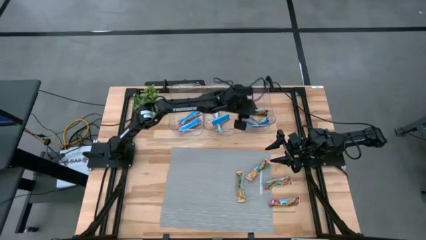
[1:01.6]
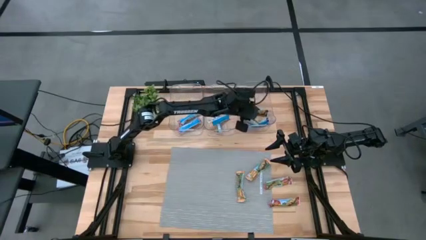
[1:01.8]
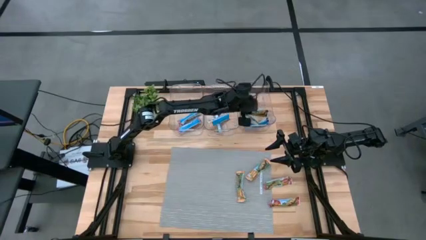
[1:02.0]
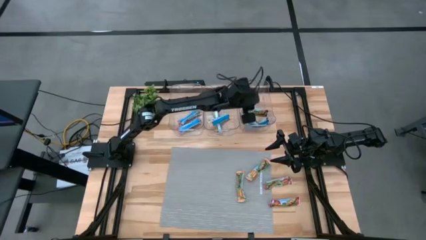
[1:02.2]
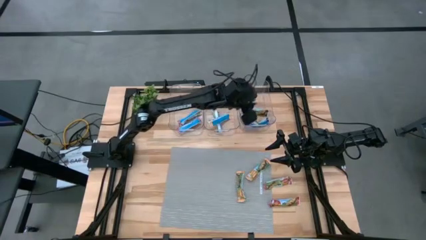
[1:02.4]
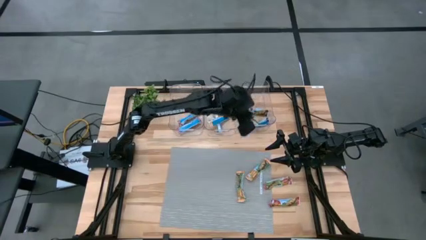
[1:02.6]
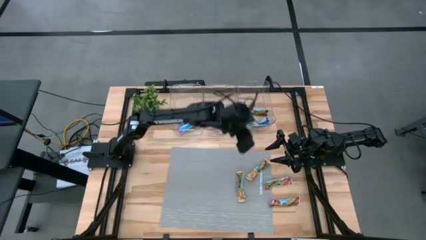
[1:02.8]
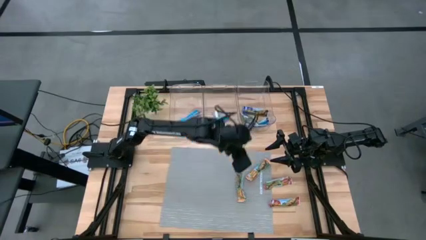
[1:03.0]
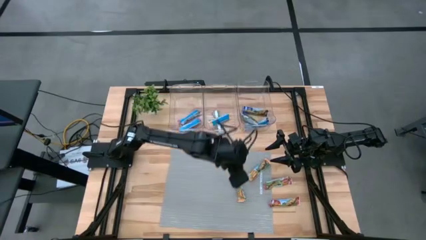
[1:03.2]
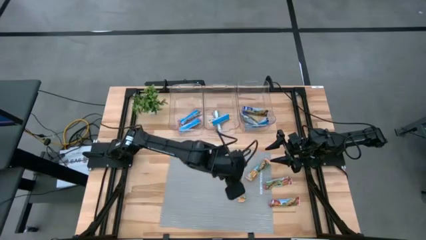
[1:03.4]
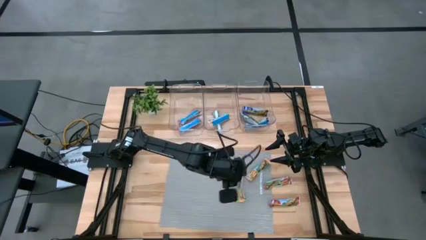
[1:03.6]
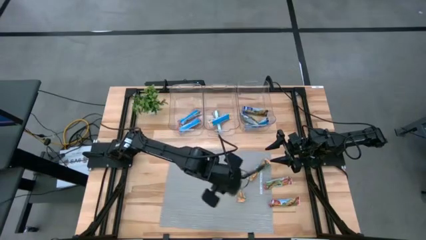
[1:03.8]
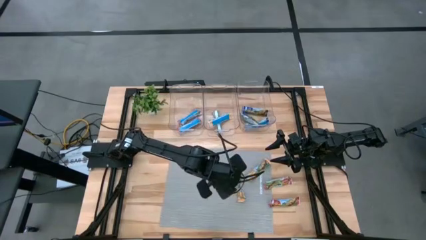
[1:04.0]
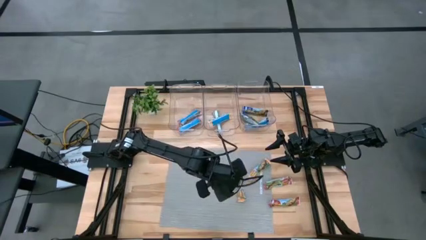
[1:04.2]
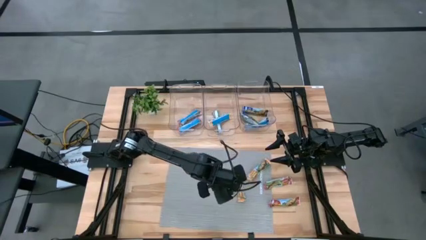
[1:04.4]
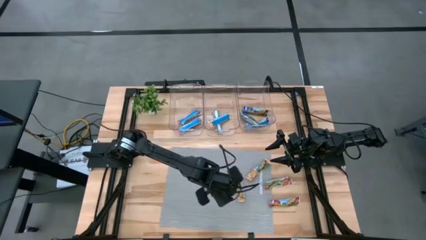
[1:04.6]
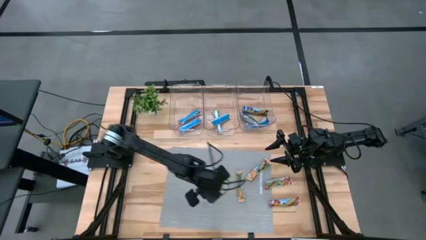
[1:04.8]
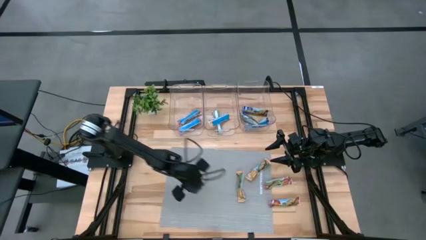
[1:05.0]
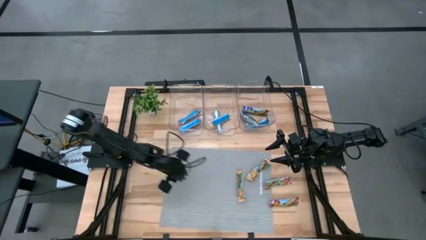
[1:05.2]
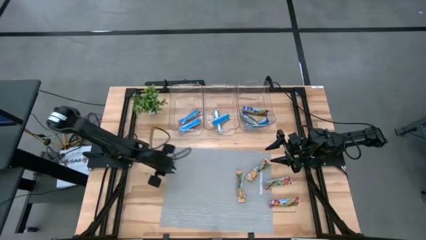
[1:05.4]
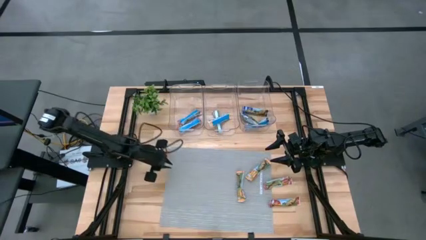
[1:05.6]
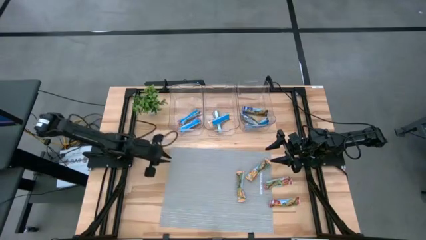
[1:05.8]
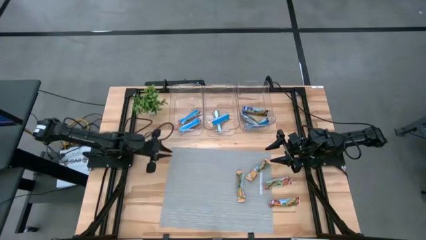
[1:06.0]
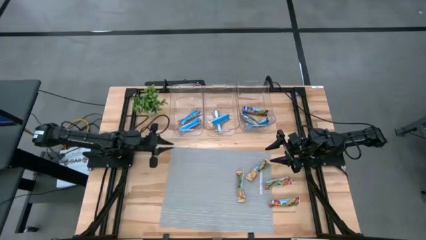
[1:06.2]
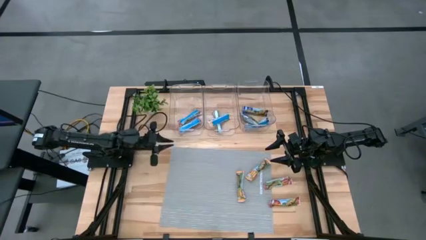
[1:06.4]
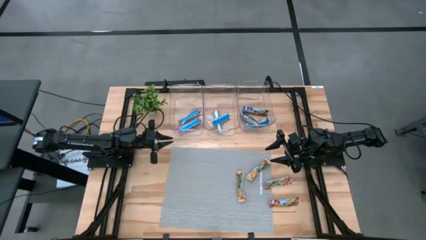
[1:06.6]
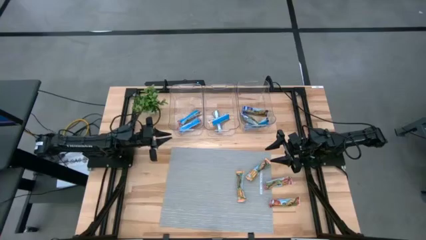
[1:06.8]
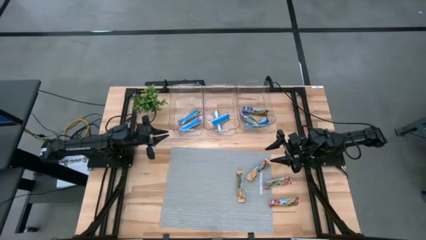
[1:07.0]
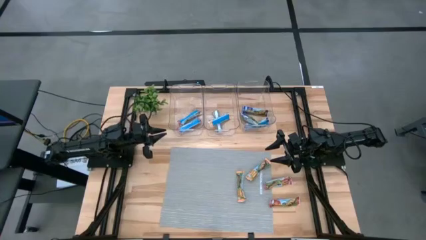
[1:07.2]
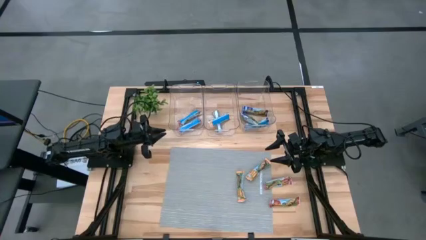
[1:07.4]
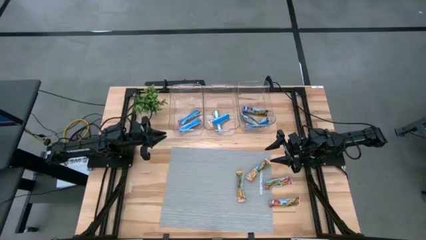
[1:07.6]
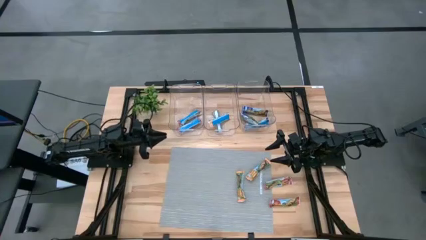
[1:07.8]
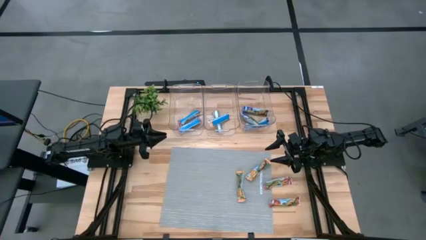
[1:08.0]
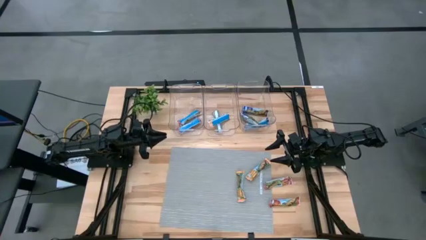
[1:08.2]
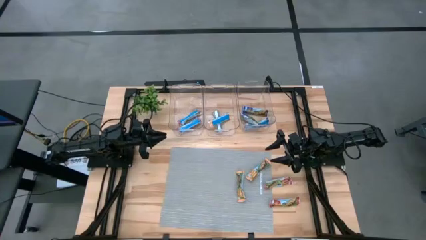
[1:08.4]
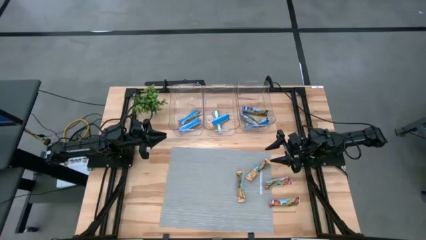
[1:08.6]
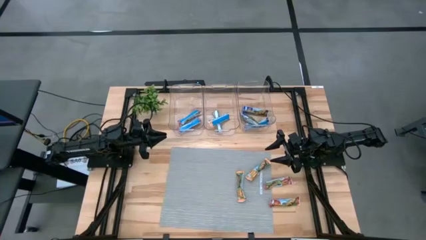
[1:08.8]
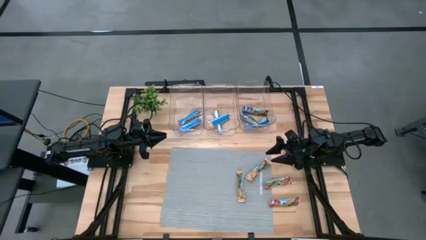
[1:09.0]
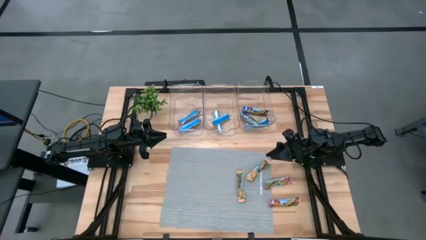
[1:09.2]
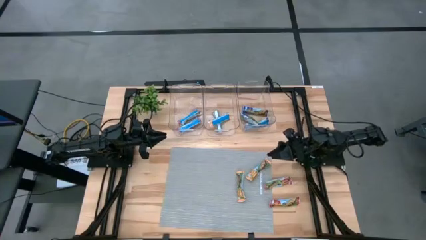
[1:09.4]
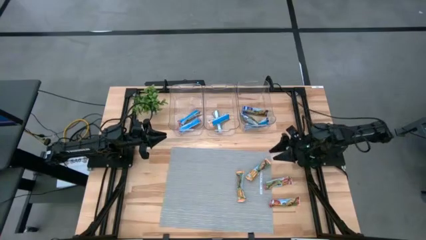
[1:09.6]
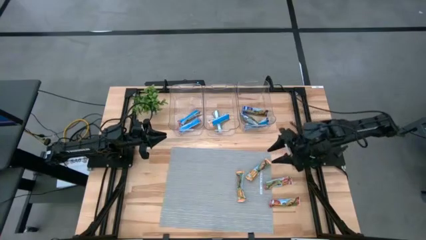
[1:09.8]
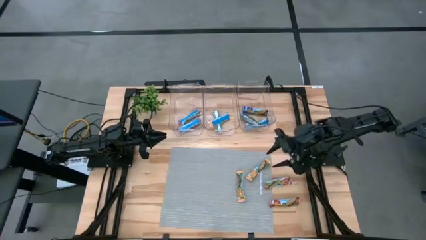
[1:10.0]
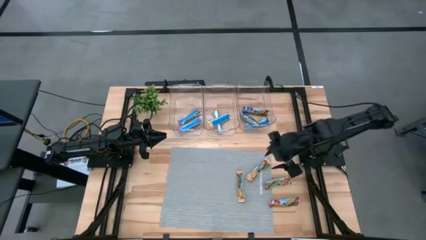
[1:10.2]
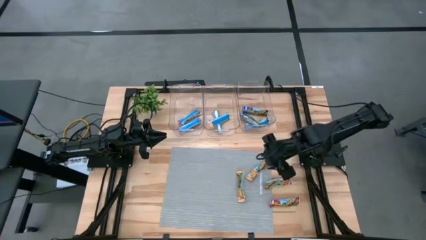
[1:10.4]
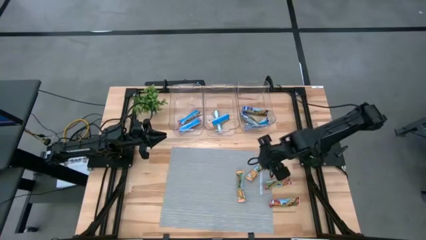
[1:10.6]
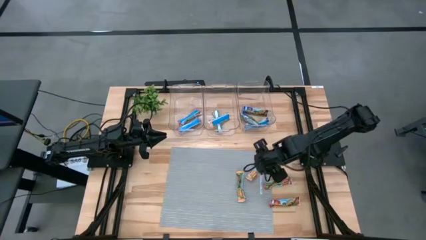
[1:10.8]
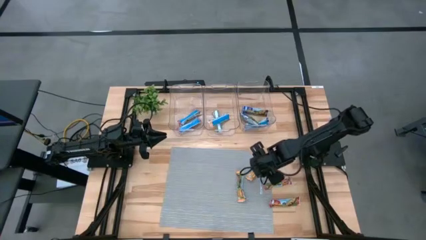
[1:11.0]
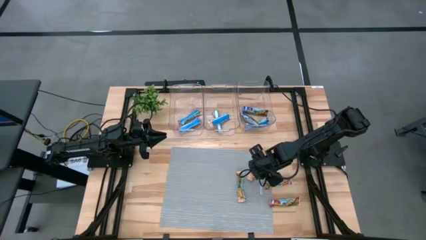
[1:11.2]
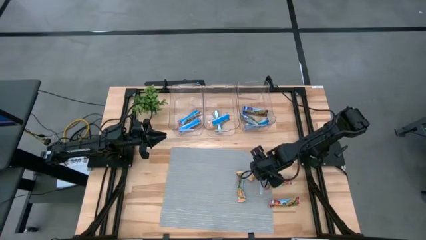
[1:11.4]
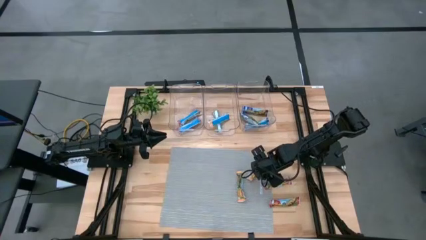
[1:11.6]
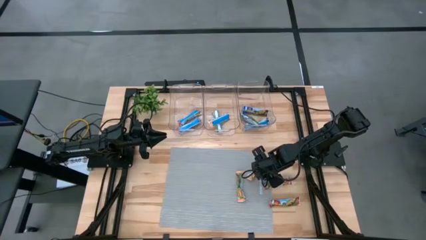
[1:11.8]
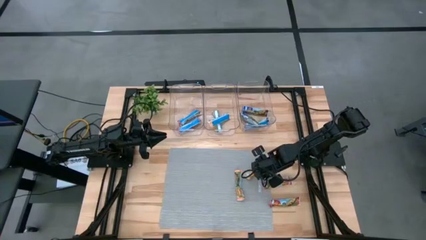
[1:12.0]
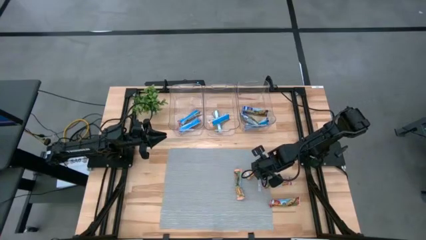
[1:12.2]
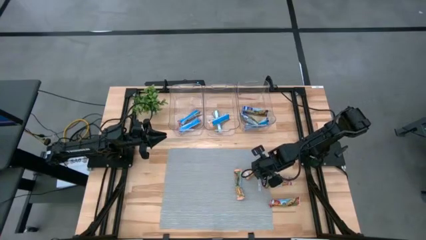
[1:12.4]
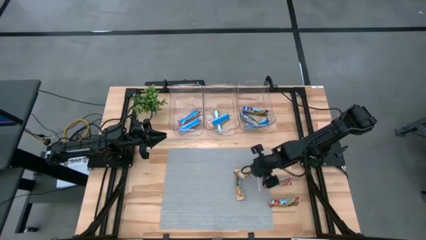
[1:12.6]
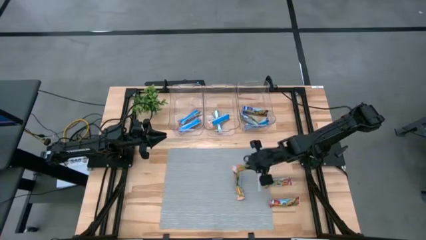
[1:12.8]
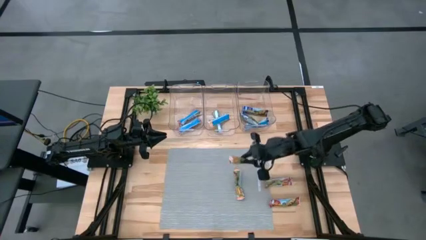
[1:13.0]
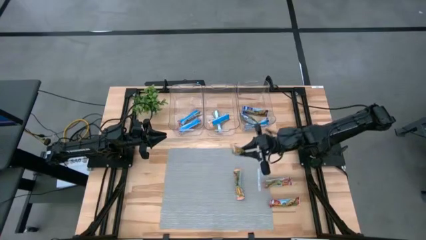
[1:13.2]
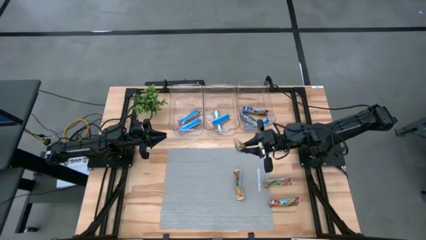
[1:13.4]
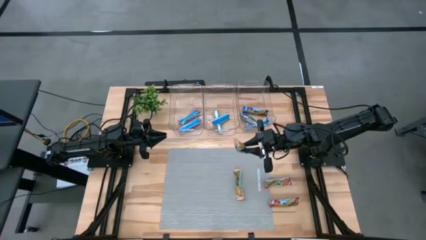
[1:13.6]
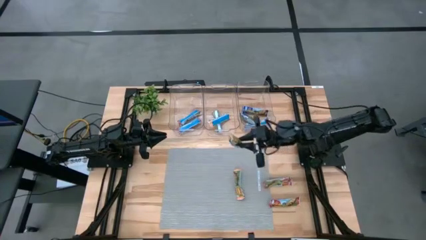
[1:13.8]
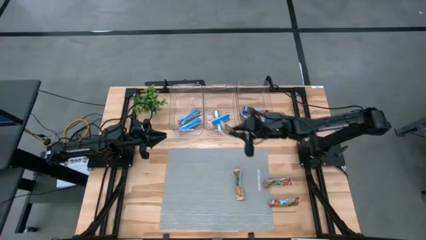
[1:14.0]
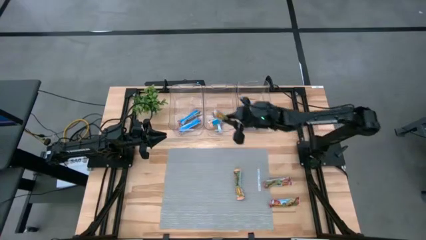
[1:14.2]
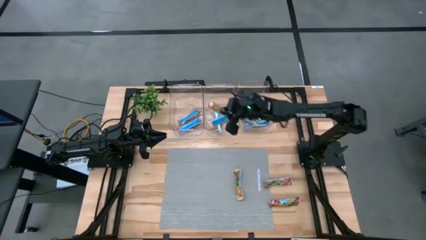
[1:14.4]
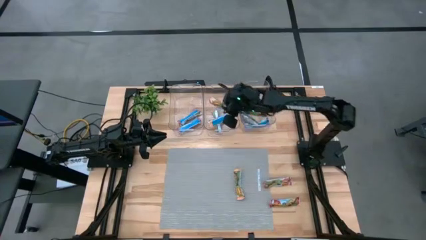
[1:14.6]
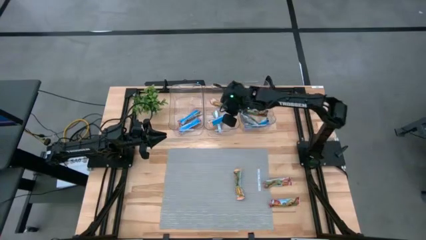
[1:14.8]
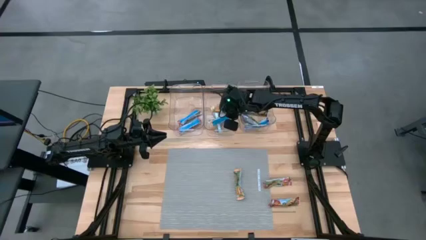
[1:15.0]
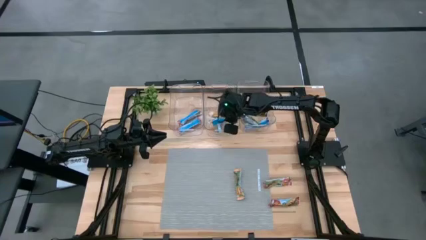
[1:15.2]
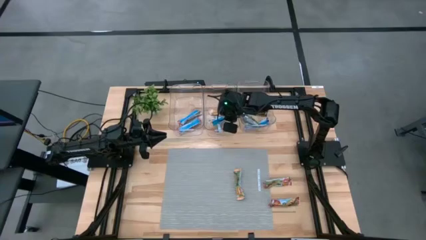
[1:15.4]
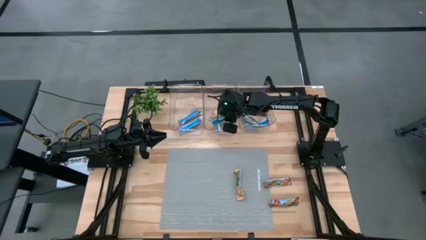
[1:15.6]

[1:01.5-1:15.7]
Task: Pick and place Granola Bars by type
Put the orange granola bar into the middle transparent bin

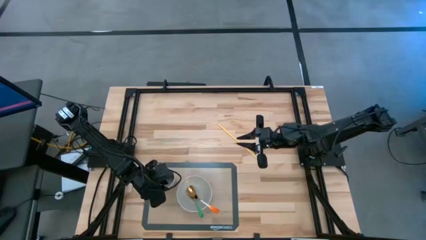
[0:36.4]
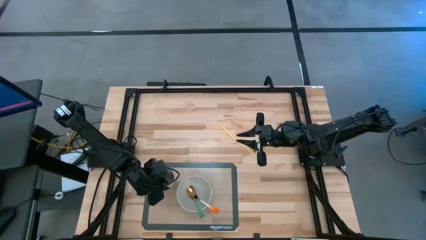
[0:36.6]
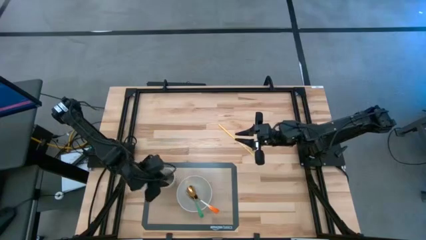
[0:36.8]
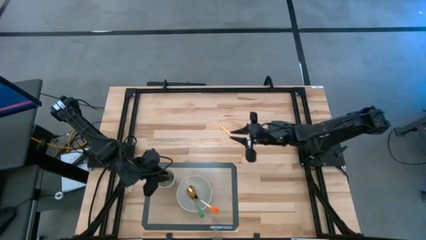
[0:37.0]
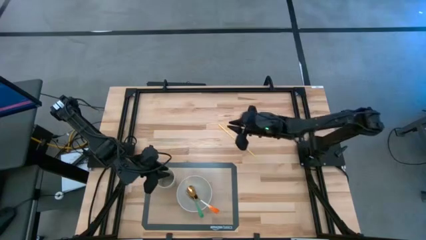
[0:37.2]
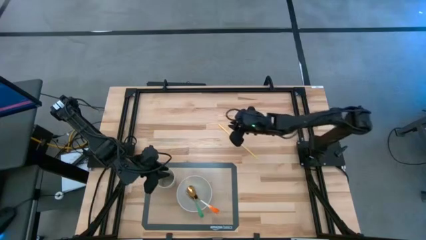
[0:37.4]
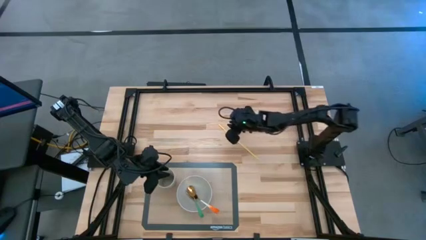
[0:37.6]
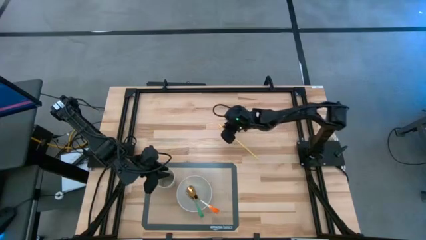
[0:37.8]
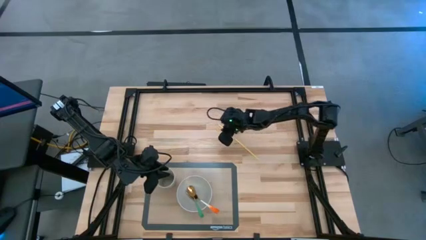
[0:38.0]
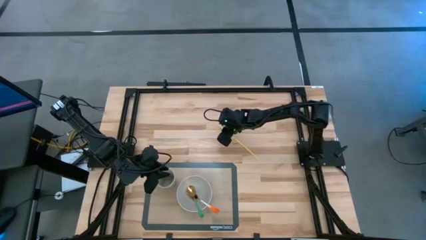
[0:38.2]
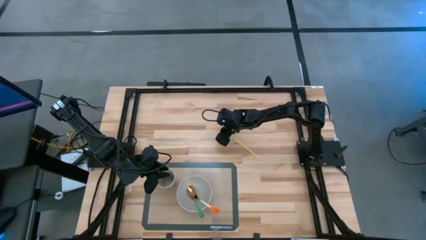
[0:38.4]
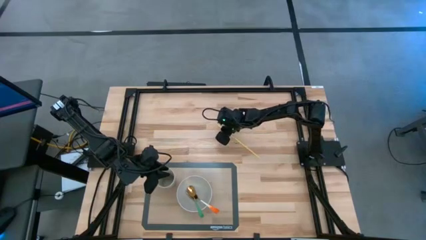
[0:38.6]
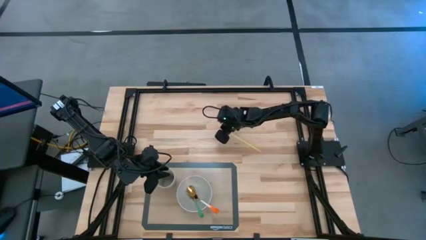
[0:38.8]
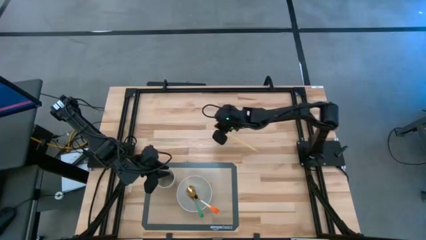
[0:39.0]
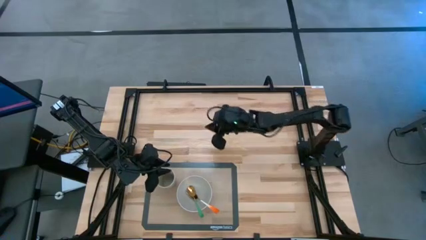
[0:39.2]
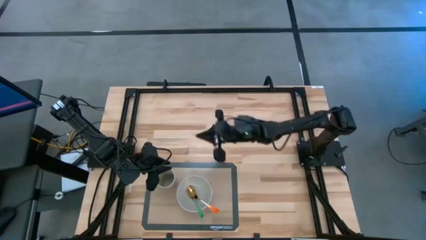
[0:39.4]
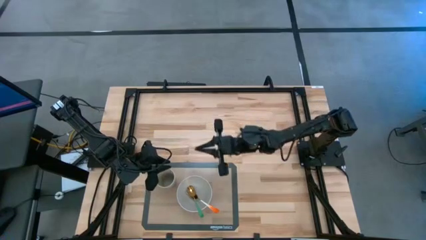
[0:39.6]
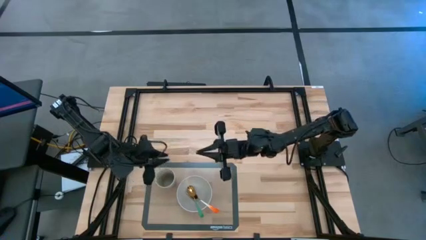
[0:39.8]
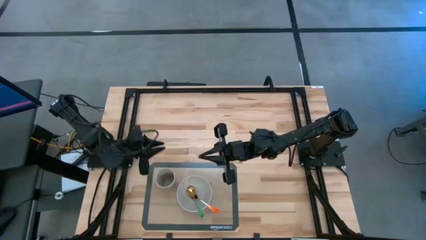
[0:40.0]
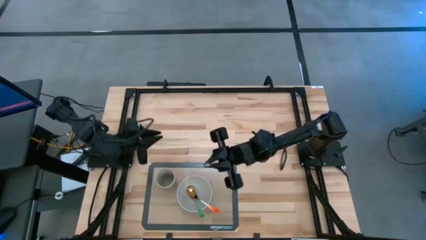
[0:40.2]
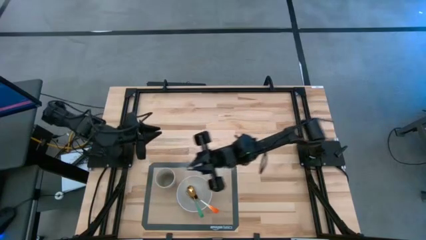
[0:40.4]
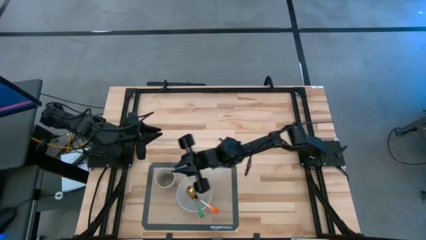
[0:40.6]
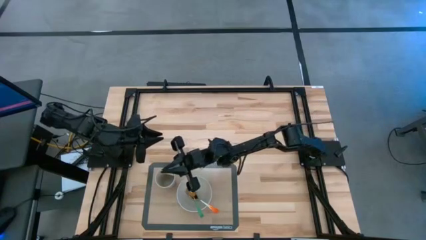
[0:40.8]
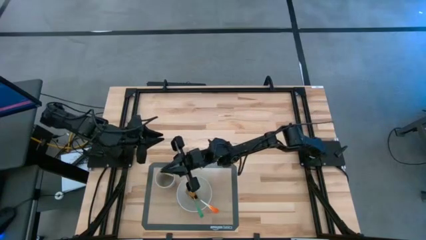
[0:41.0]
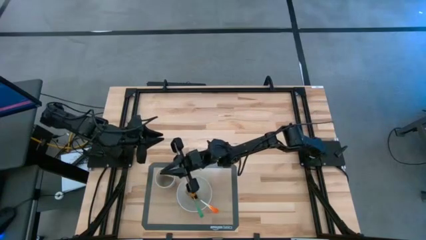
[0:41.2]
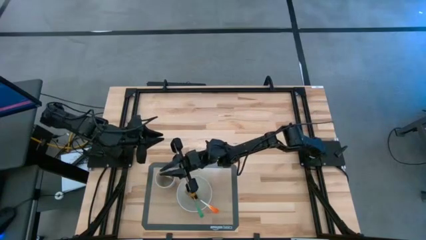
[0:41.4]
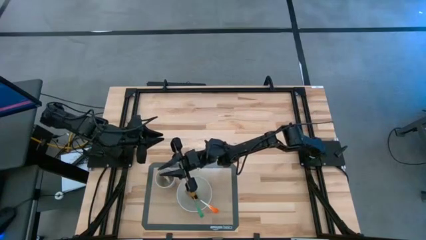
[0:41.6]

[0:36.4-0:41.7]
Task: Pick & Place Utensil
Put the yellow straw into the white cup
